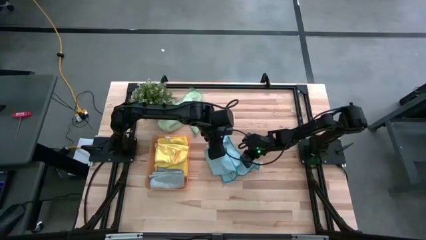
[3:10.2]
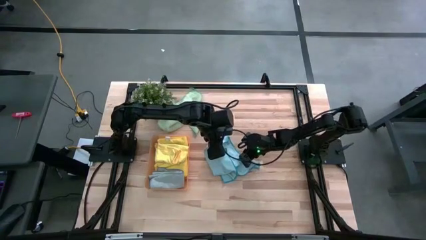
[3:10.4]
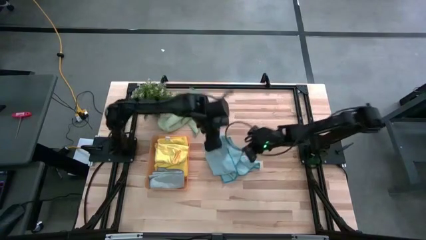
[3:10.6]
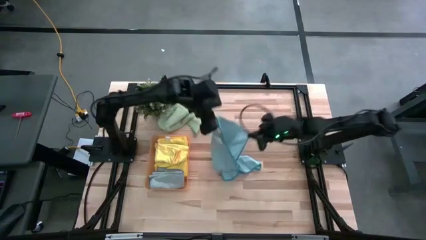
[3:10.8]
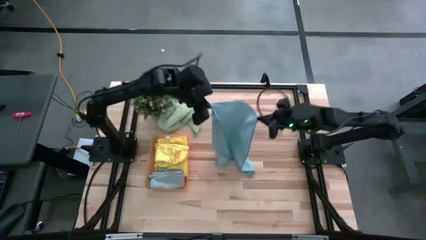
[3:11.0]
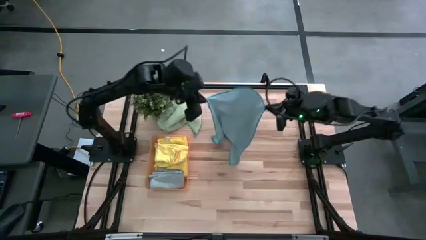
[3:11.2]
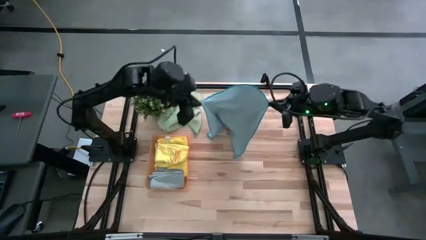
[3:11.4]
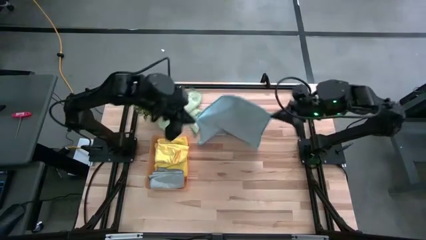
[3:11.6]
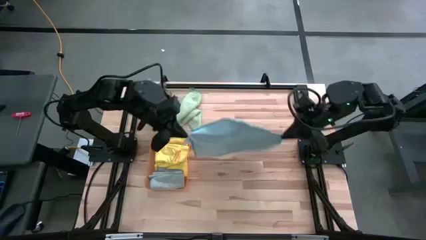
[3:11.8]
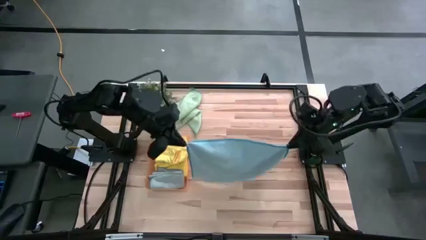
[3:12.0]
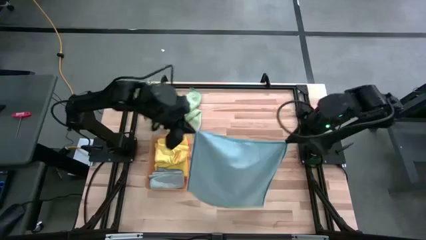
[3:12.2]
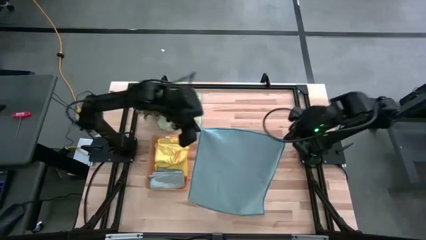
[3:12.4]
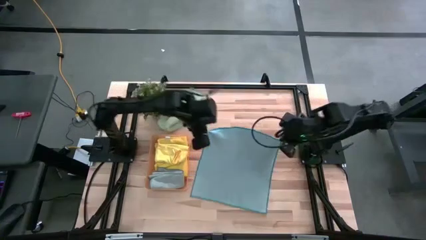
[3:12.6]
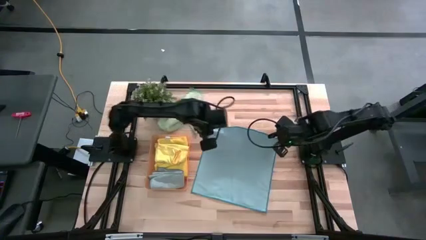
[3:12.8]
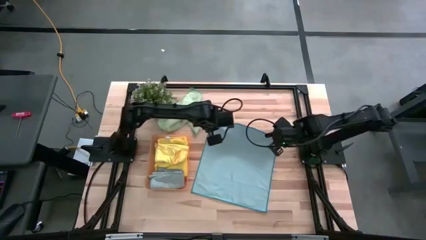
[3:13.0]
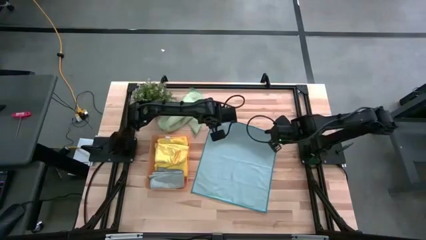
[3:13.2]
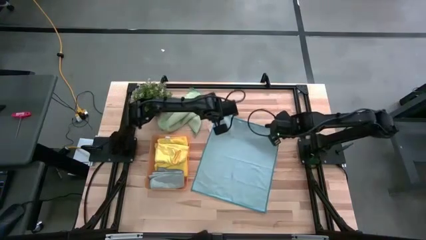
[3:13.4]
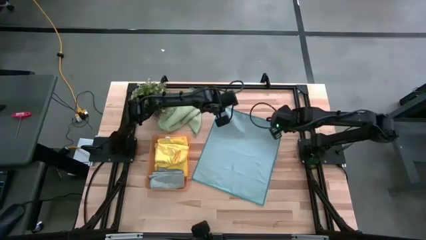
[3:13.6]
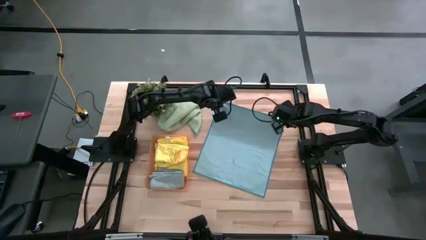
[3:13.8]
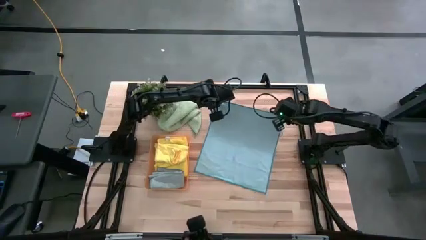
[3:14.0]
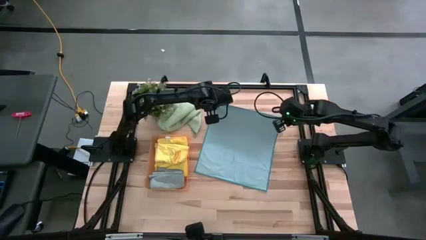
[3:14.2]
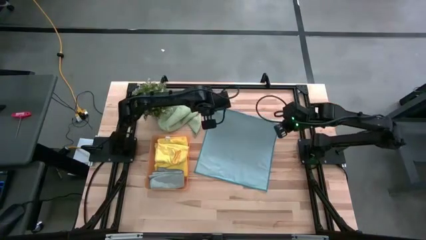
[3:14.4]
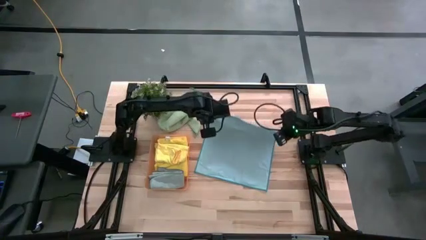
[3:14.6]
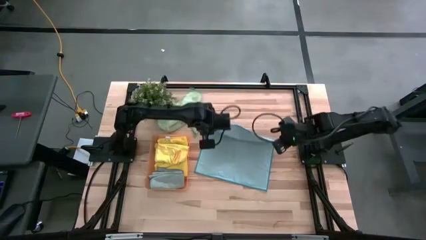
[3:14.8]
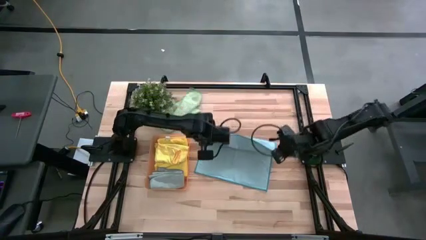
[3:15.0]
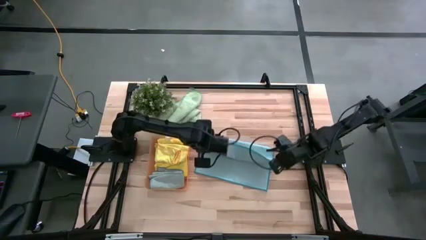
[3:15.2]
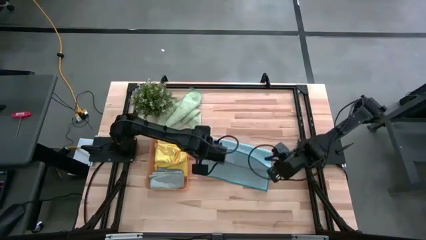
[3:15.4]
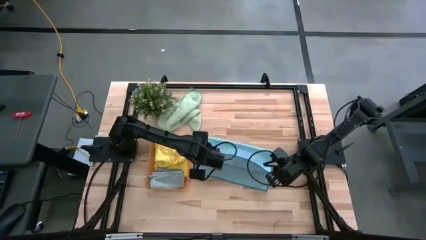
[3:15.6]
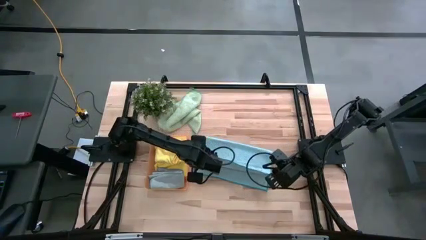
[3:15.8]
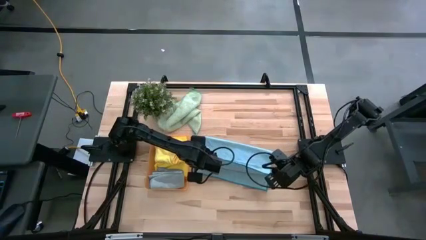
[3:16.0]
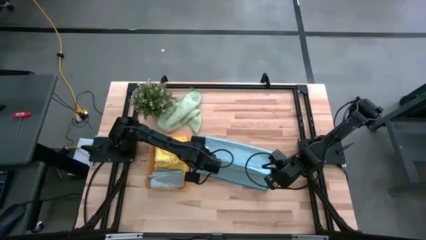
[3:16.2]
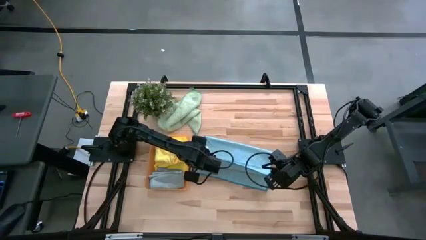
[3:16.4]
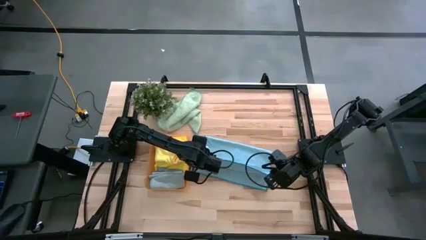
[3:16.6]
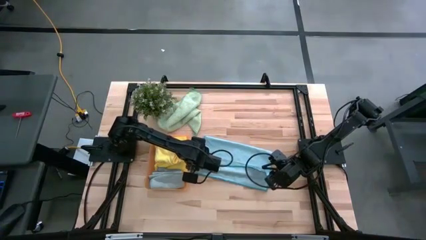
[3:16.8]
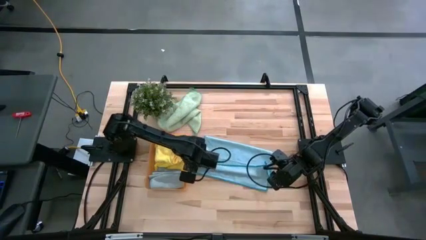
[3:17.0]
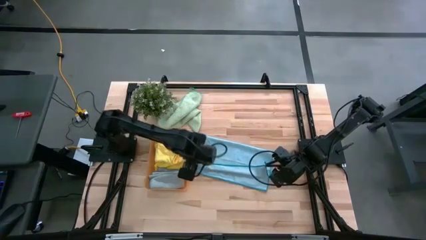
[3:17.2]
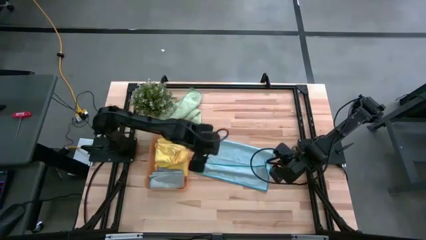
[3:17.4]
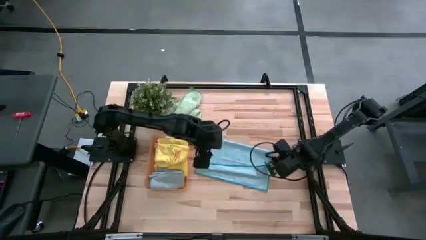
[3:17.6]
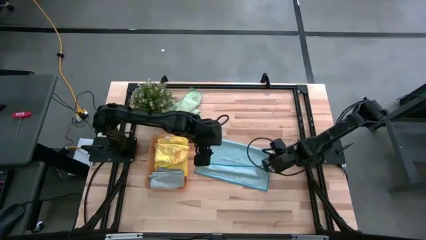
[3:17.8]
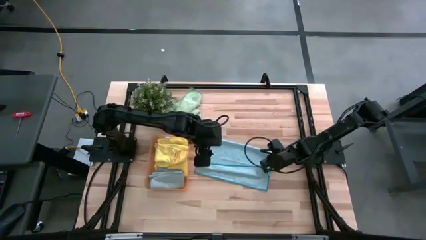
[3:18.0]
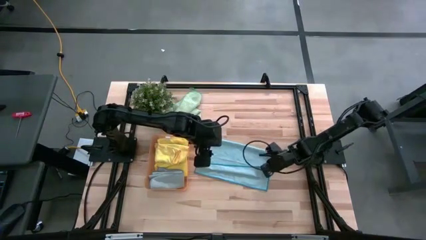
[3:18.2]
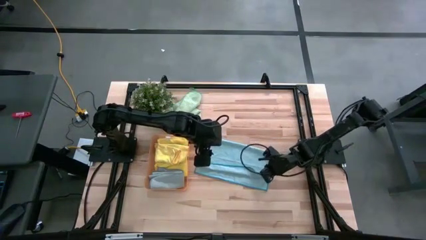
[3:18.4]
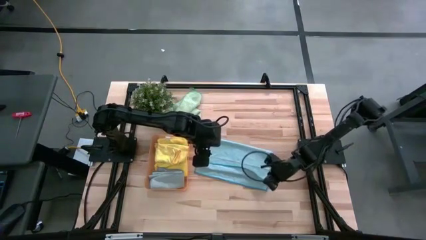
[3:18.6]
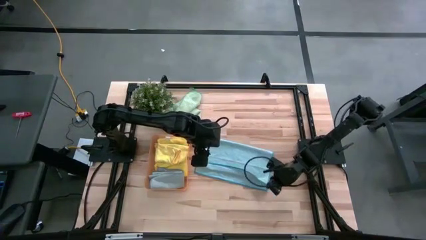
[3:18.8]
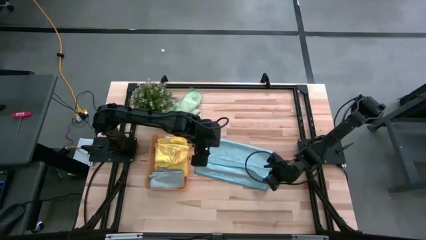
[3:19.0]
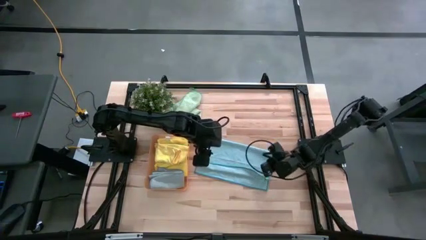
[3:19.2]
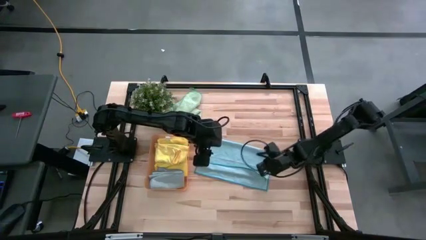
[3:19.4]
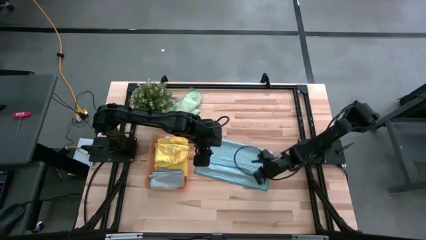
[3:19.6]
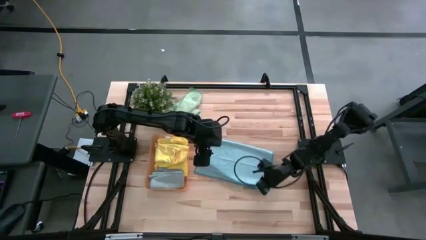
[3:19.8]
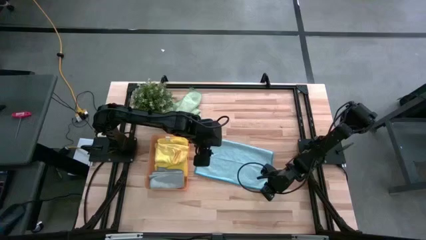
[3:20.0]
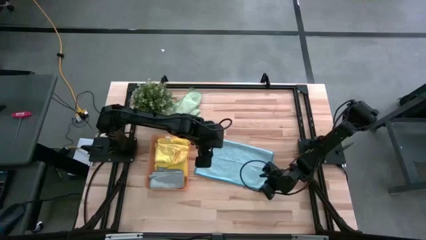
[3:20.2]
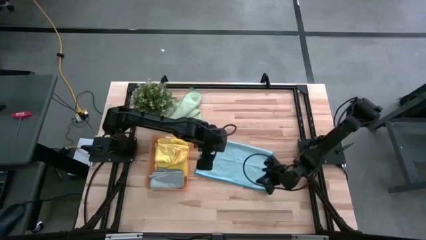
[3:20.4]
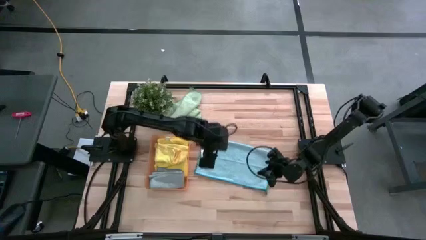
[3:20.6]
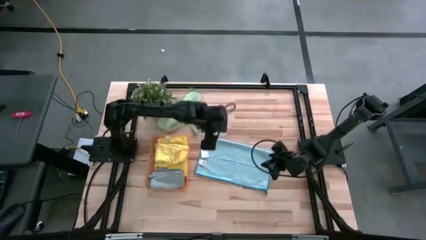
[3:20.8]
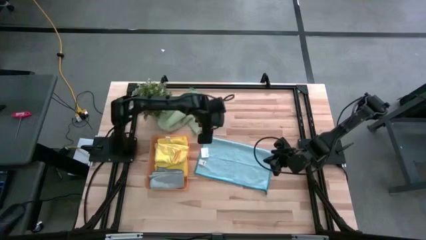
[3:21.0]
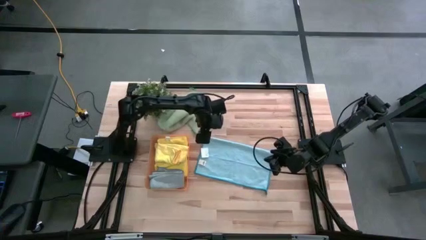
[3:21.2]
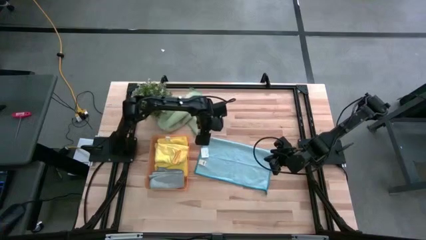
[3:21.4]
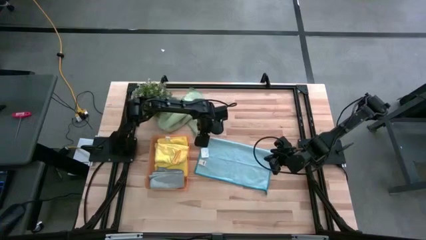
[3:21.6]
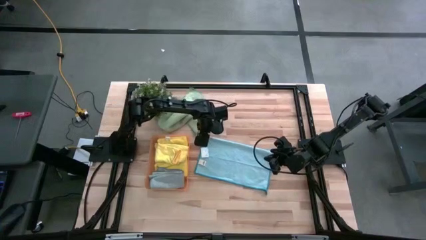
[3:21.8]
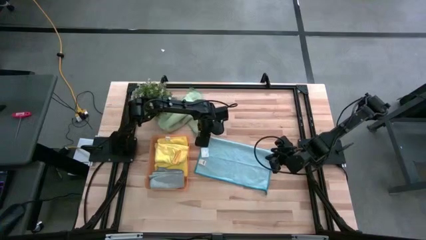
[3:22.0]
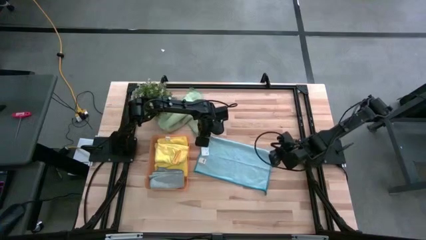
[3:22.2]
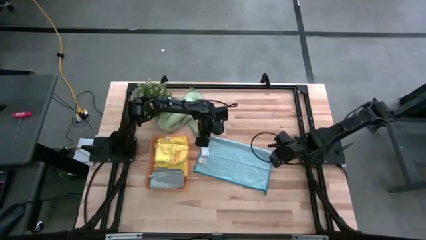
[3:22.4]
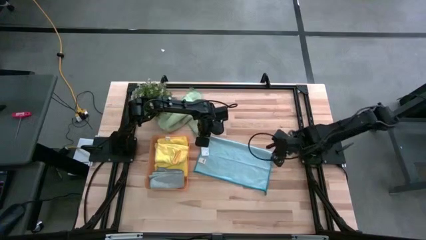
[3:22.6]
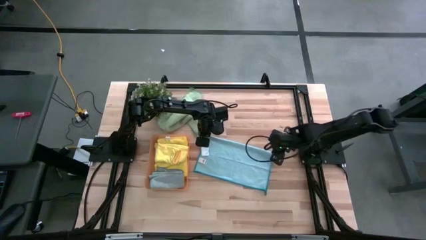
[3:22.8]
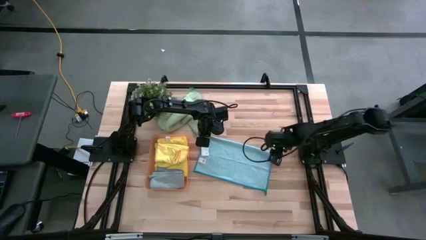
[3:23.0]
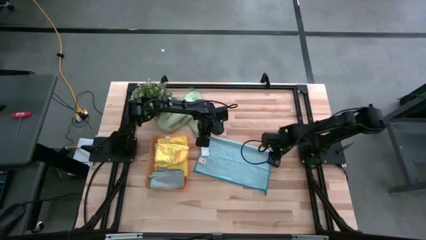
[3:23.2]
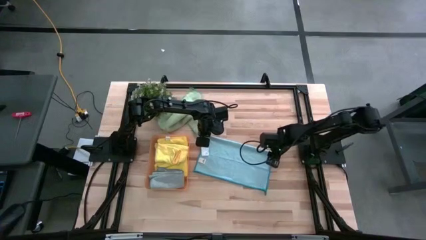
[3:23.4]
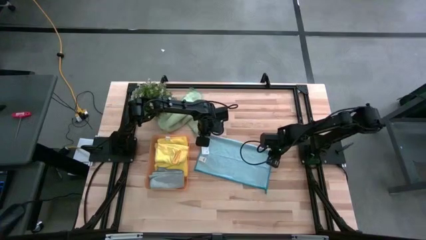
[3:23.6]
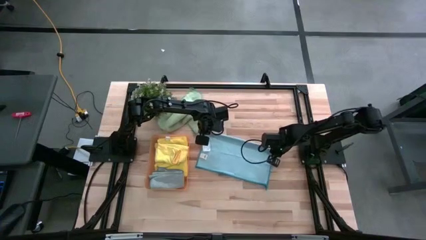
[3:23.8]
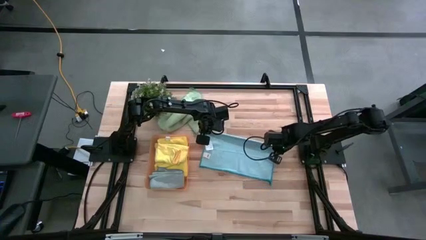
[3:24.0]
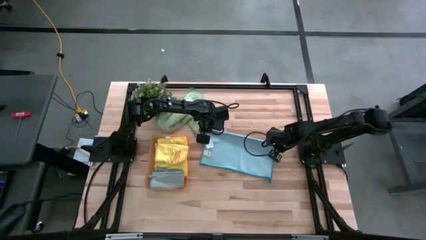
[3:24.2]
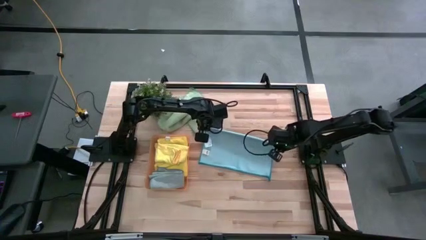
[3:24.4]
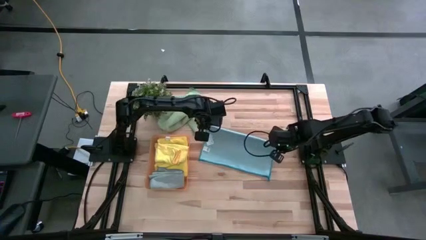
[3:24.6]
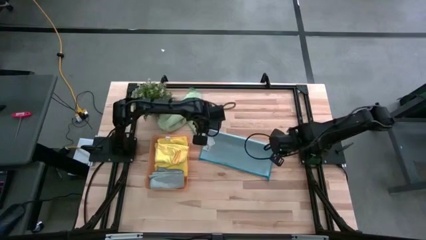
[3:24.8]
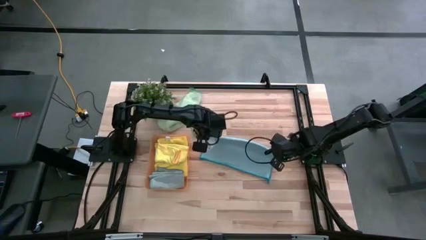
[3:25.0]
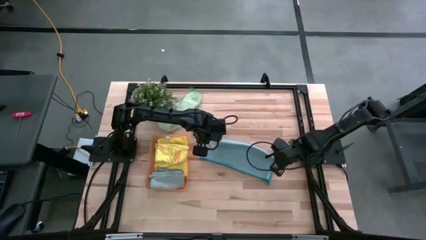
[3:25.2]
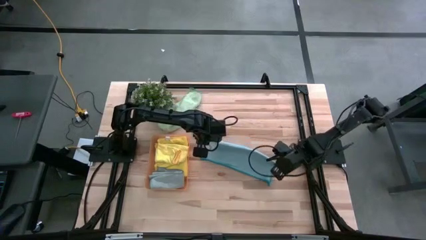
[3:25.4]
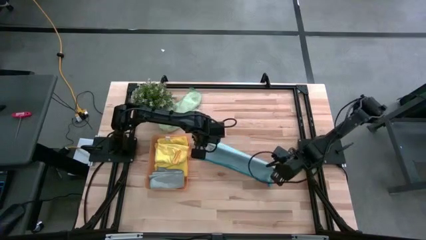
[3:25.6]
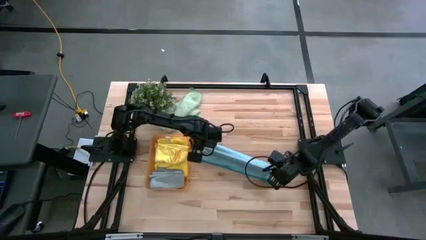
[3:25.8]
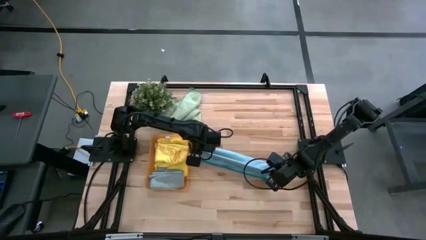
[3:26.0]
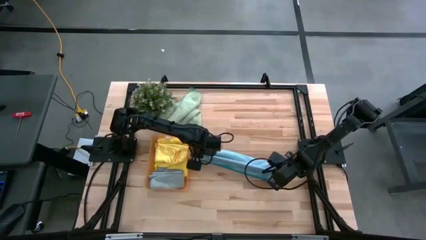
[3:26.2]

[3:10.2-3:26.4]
Task: Fold microfiber towels
Fold the blue microfiber towel
